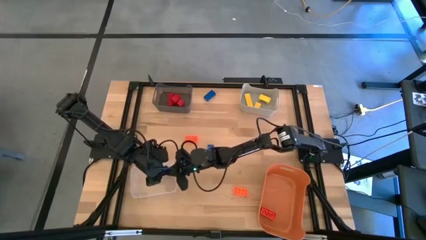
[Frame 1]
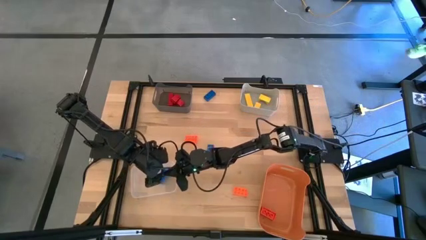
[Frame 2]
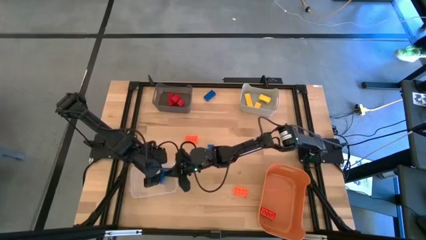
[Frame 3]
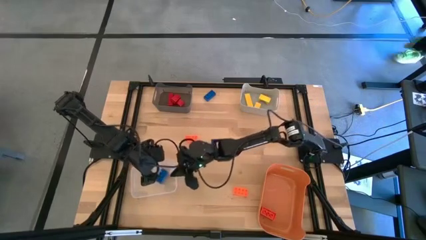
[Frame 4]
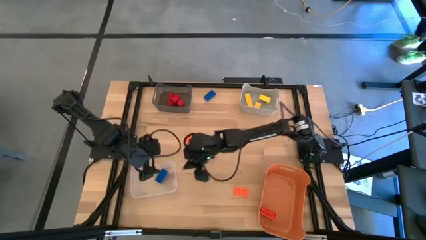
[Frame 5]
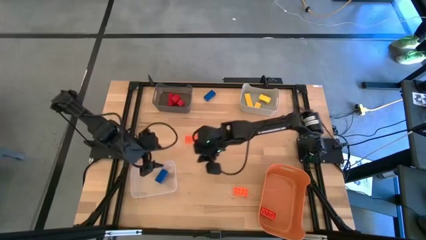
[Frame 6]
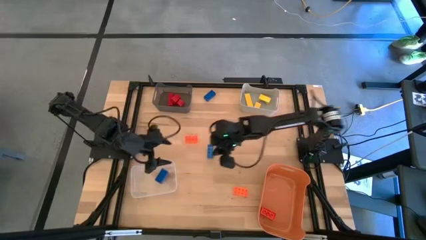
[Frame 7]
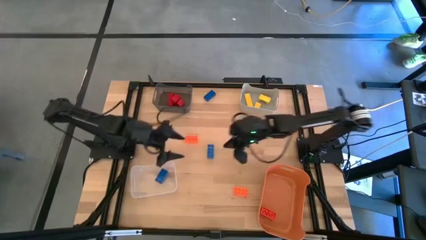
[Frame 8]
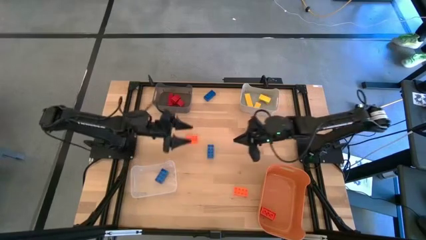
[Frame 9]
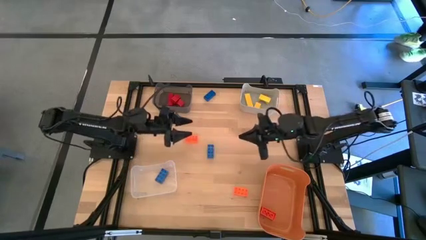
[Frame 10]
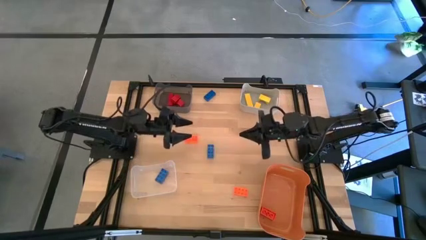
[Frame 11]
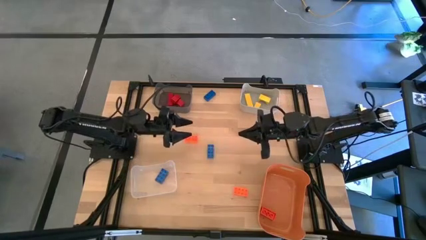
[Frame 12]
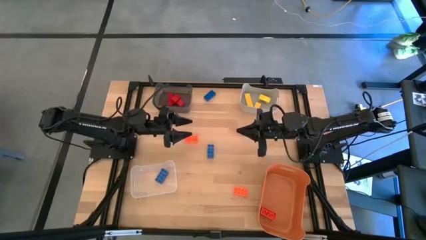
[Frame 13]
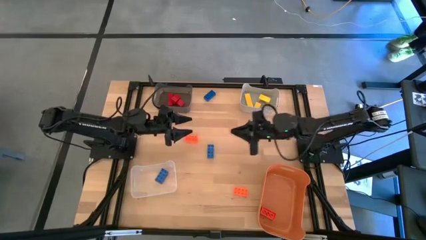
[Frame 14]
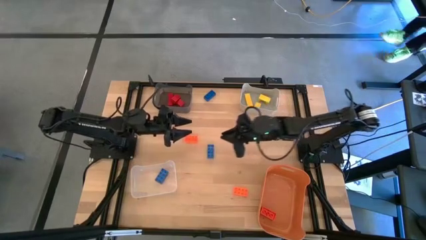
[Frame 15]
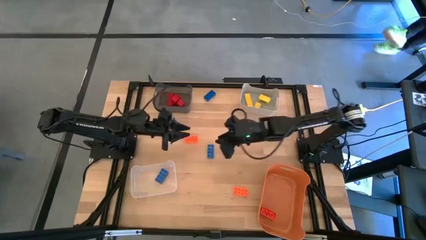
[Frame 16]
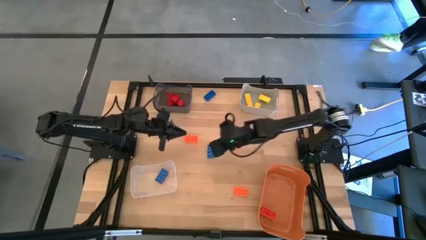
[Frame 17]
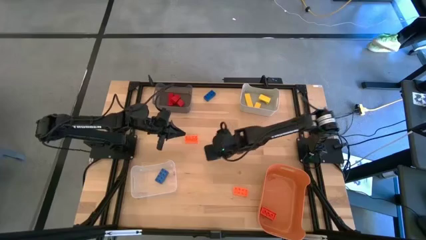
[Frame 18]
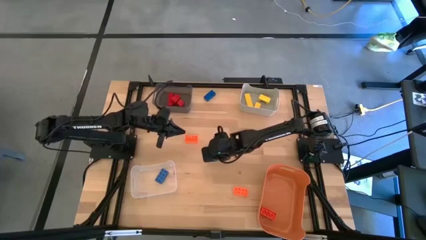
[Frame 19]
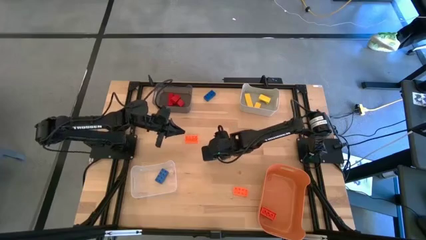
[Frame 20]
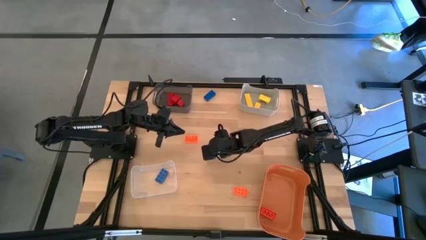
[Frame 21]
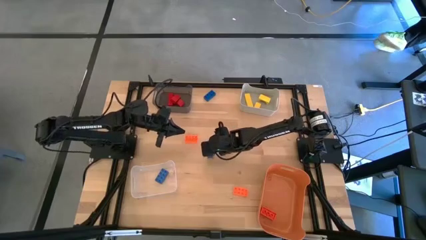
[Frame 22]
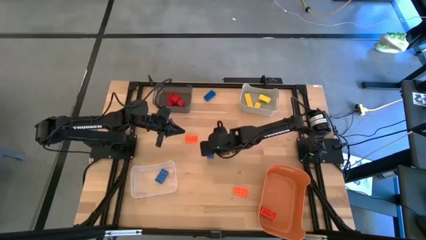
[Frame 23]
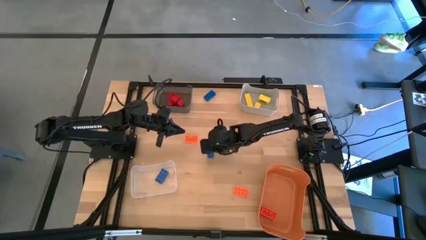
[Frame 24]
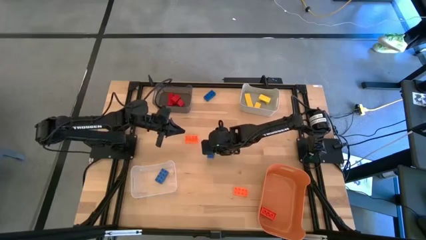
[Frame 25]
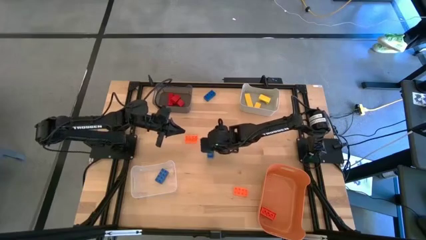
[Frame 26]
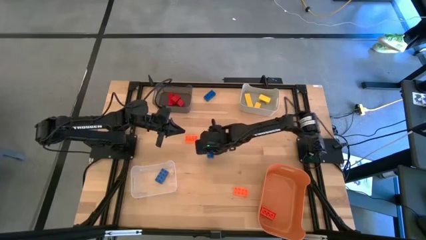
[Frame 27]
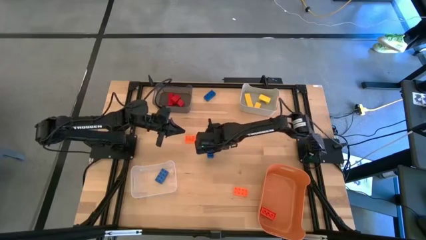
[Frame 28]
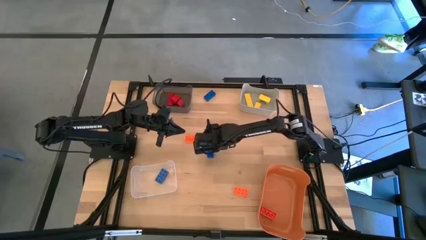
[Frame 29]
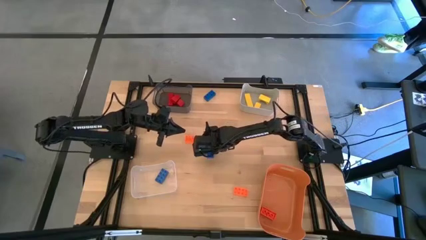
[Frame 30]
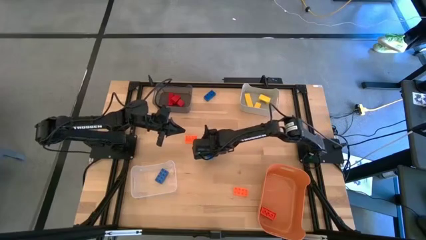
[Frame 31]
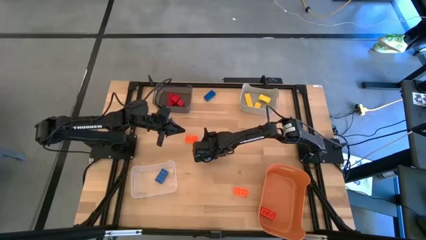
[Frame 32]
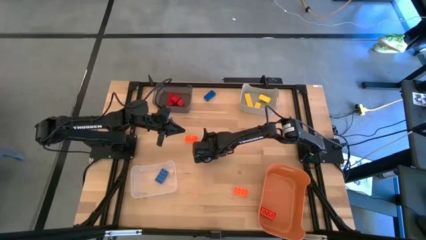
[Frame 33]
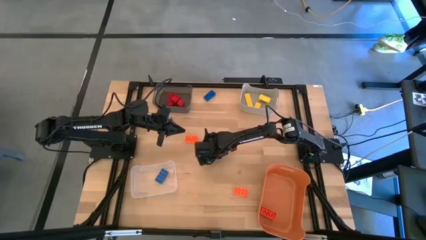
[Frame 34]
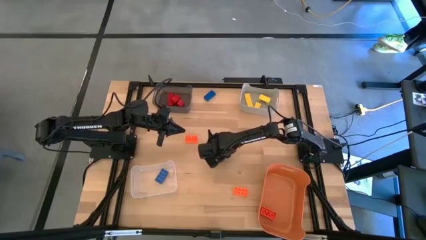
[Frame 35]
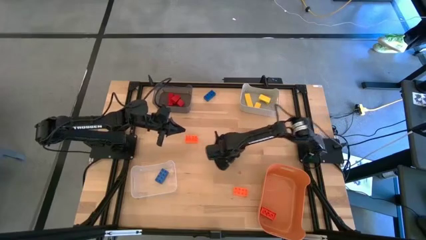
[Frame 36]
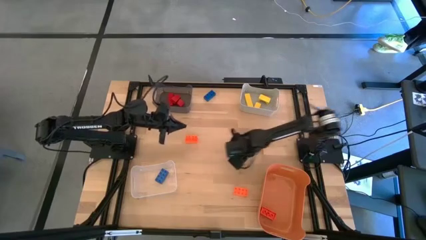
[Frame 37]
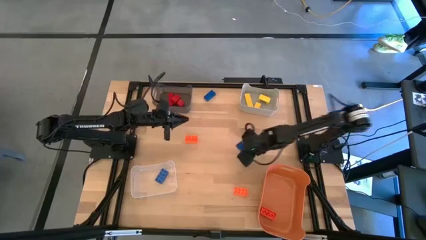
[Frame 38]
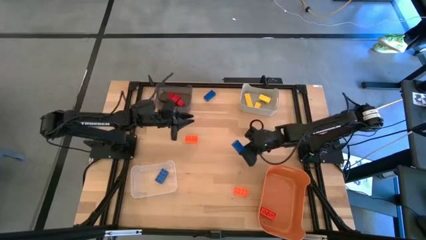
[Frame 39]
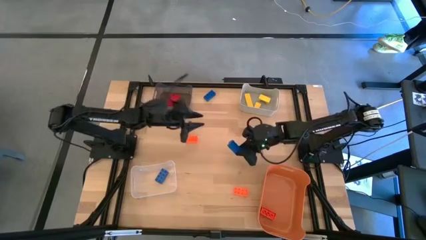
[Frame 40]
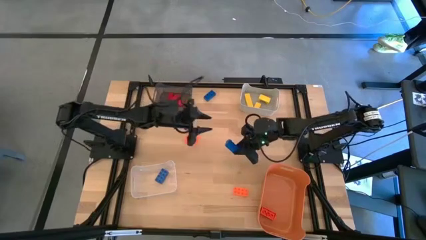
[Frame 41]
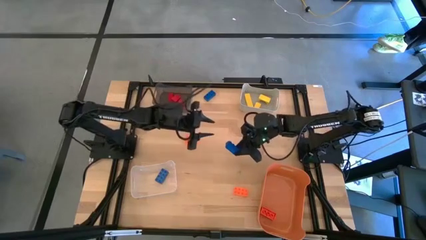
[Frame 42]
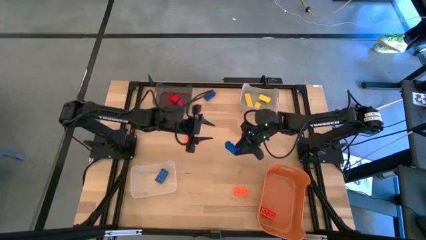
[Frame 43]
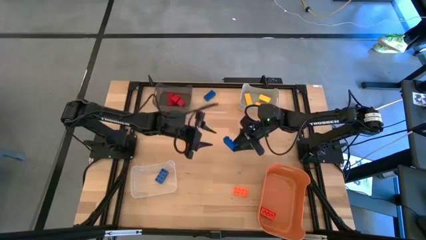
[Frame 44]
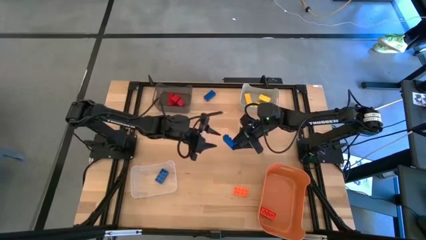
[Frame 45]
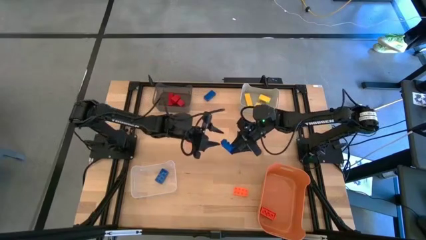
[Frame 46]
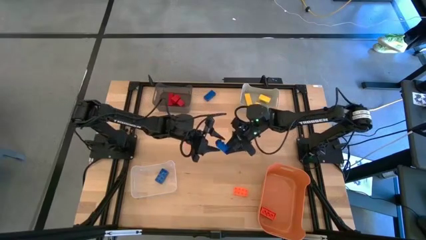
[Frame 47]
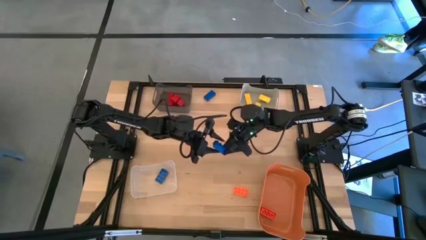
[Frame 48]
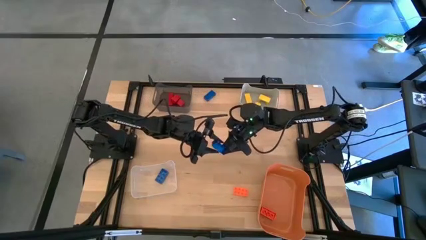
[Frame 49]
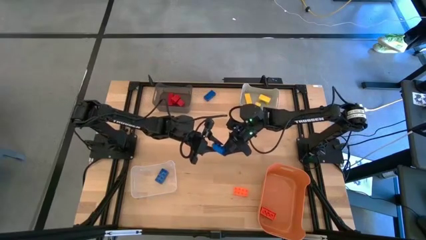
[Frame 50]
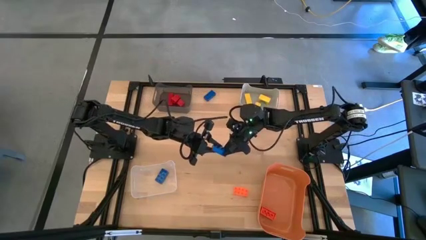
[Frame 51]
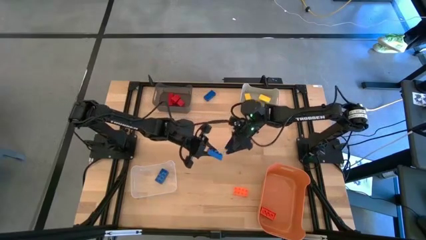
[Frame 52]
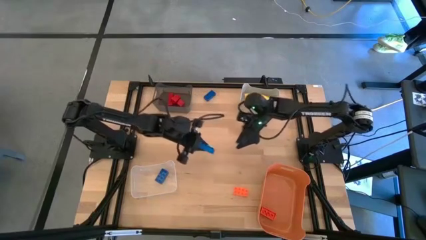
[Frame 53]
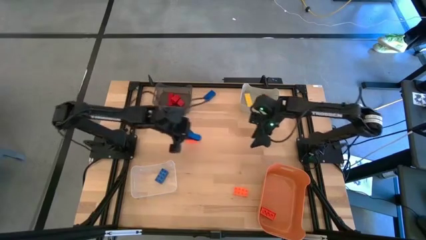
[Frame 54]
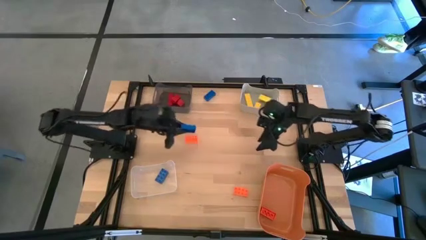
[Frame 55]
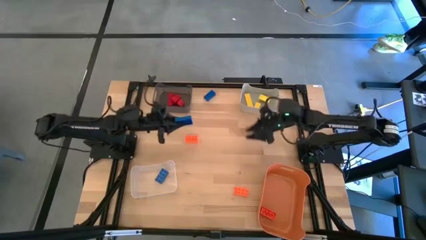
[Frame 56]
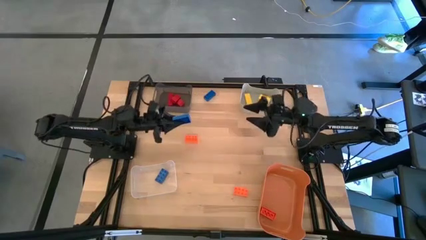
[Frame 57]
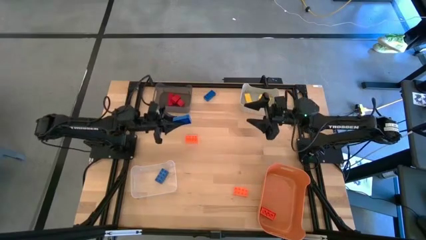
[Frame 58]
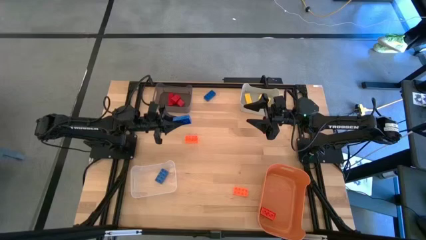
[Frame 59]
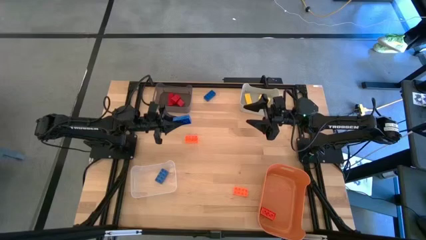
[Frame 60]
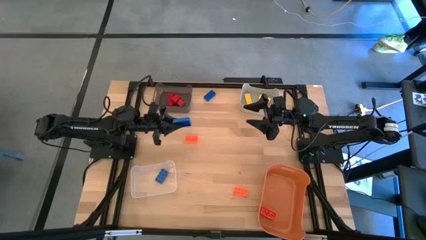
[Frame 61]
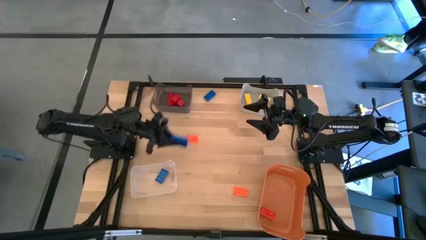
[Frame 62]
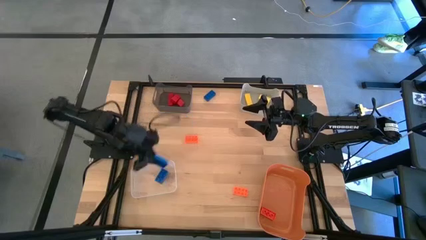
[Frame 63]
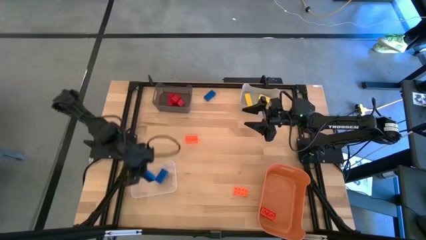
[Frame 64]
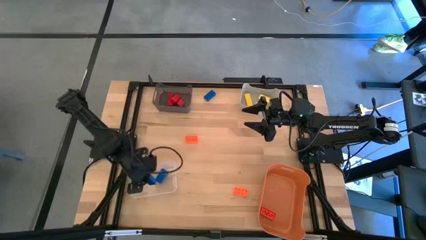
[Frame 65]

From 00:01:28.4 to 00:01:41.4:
Task: Sort & place blocks by color
Put the bottom blue game piece into the transparent bin
